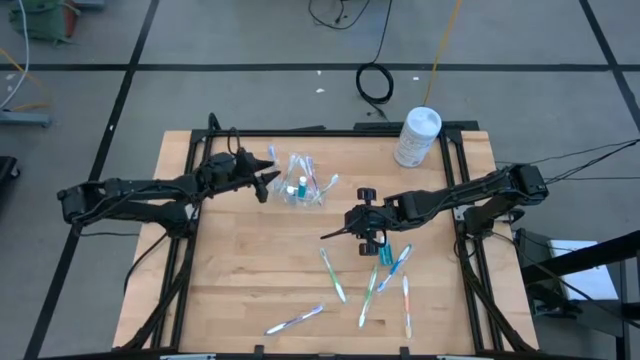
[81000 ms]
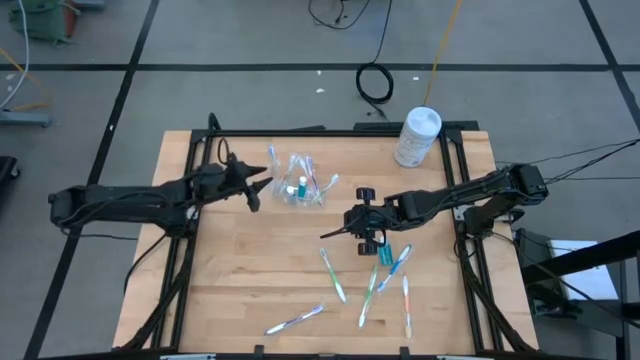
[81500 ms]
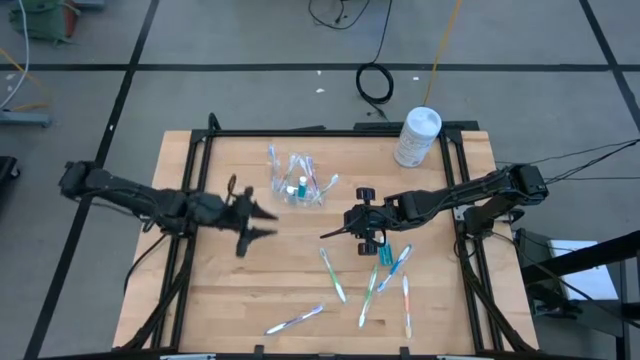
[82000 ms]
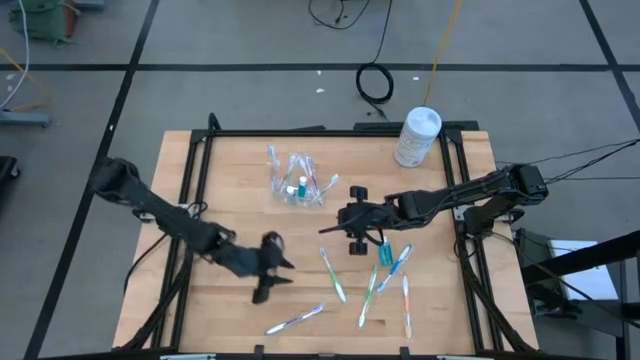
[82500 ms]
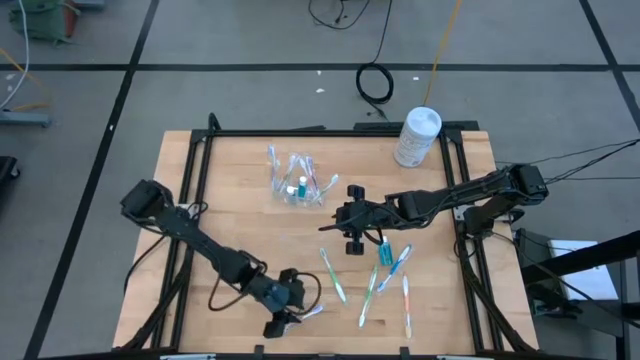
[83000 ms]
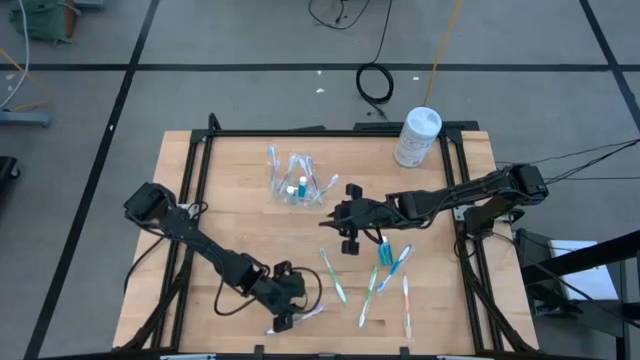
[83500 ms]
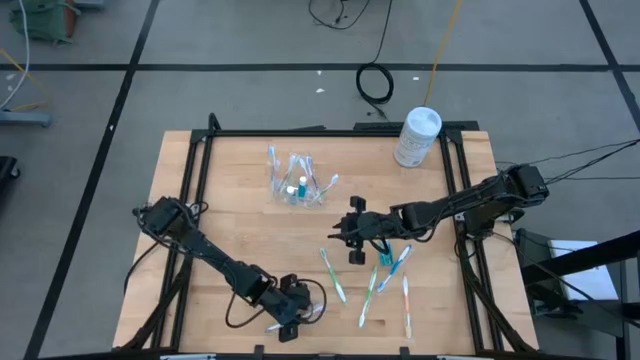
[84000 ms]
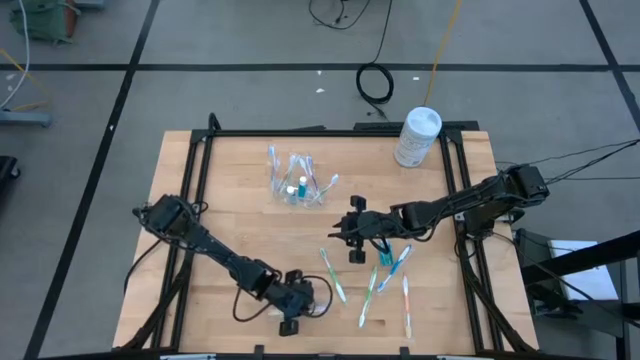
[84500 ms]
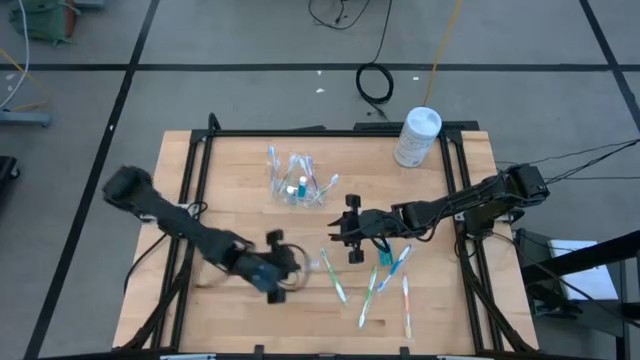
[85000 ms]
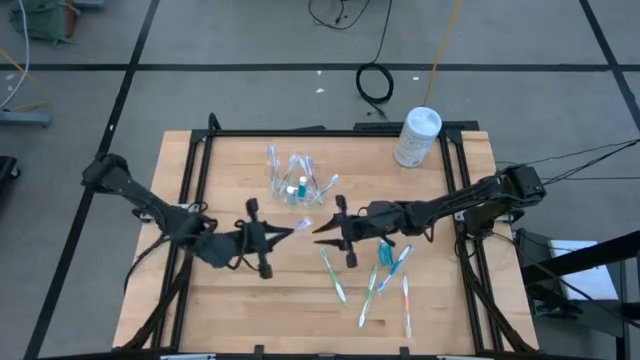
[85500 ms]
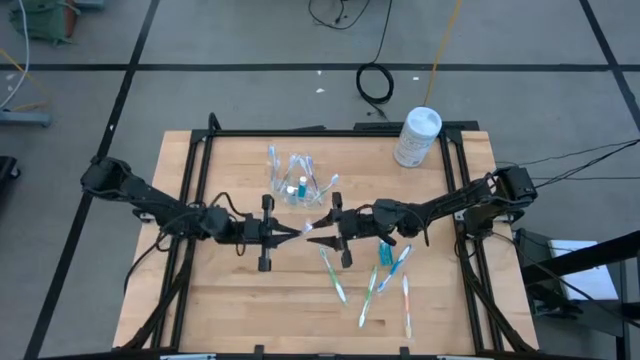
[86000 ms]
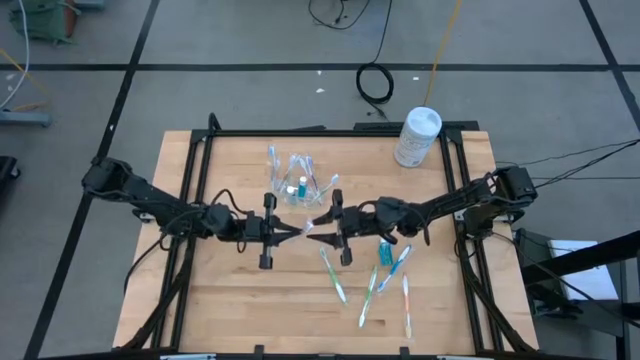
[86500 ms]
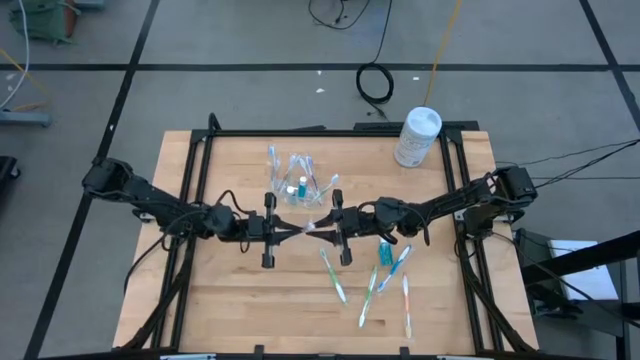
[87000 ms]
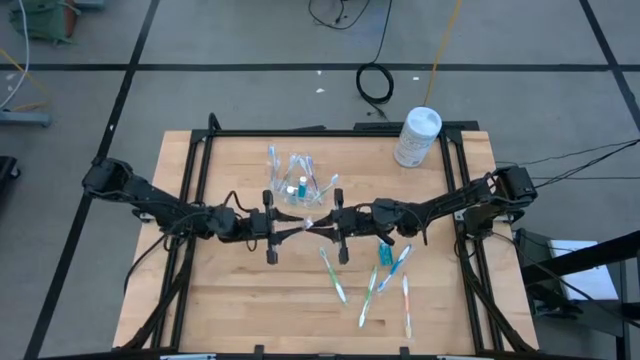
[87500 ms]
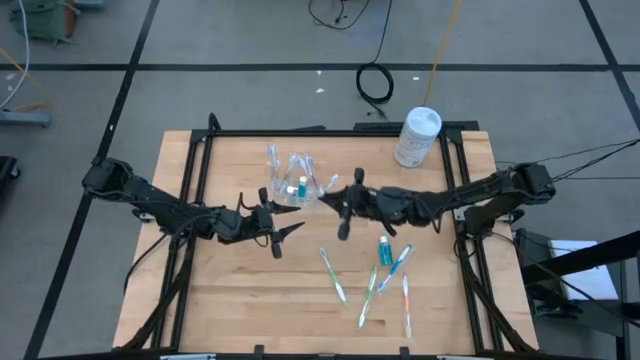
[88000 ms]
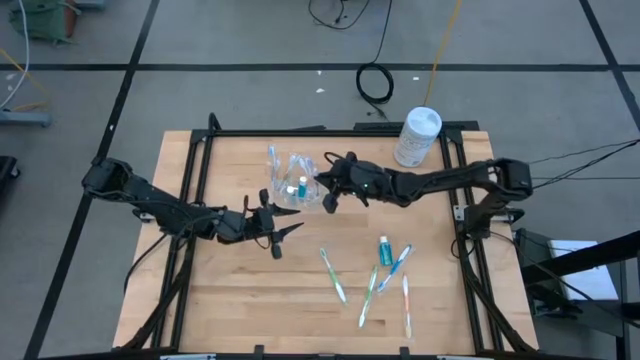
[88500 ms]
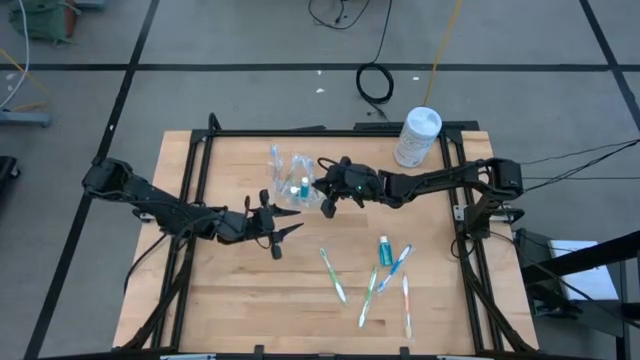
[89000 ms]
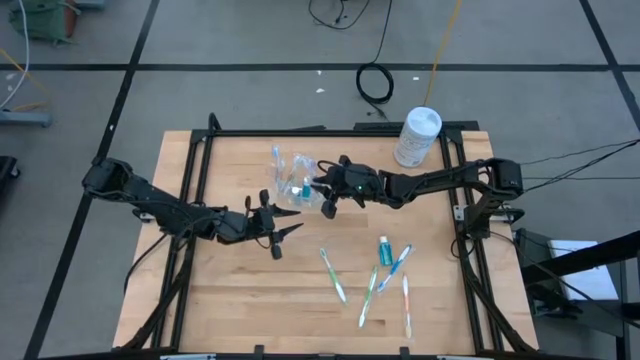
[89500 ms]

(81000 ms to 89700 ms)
Task: Pick & Place toothbrushing station
Put the purple toothbrush into the transparent organizer

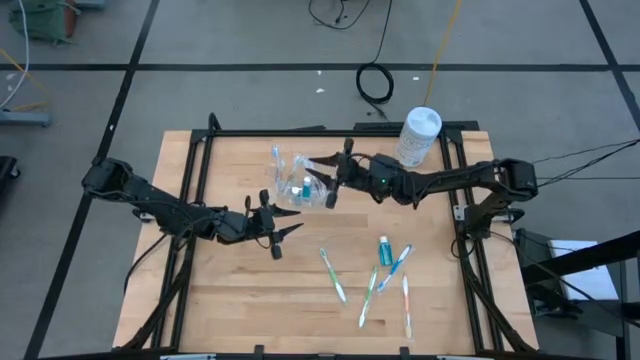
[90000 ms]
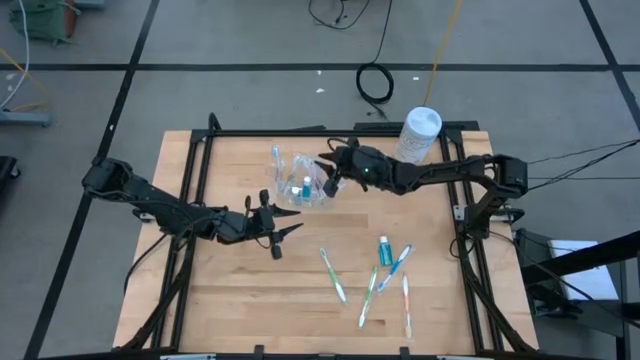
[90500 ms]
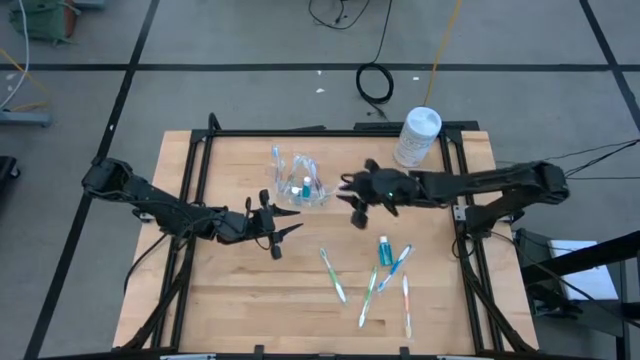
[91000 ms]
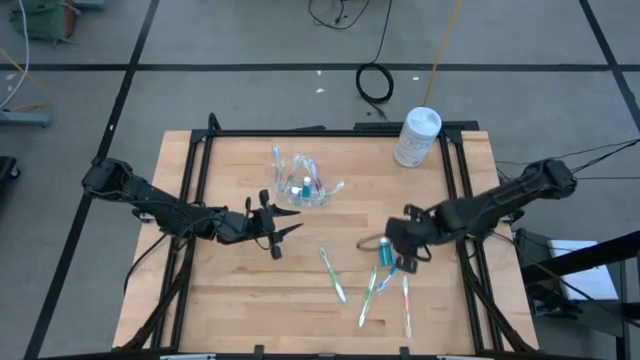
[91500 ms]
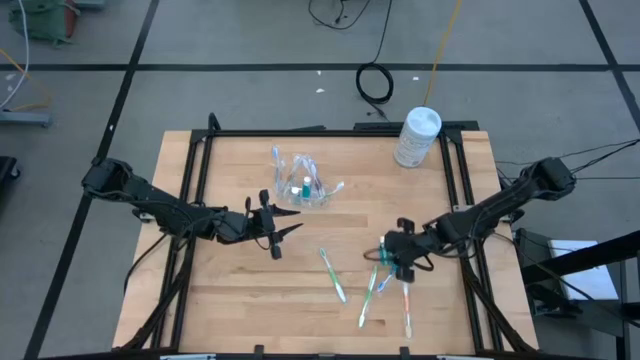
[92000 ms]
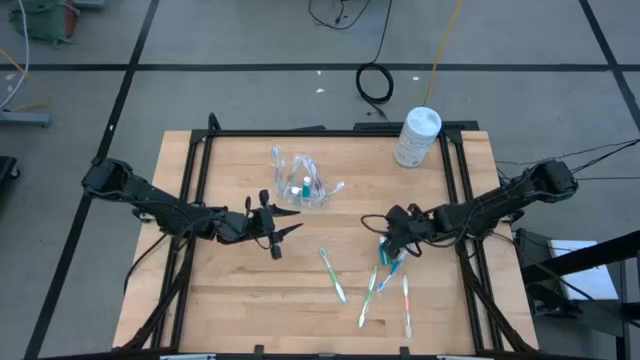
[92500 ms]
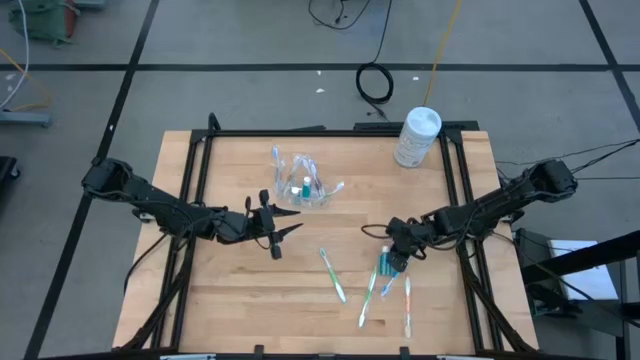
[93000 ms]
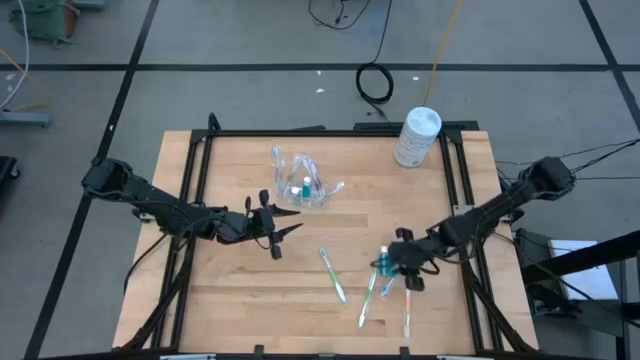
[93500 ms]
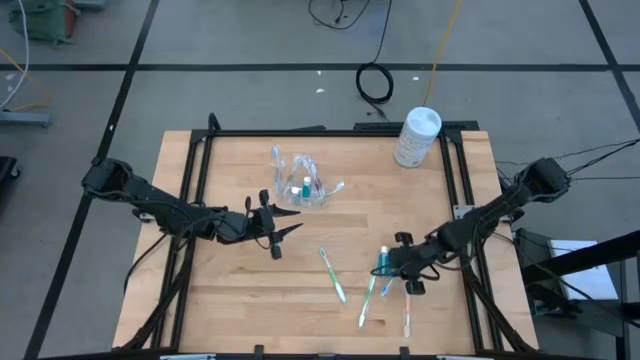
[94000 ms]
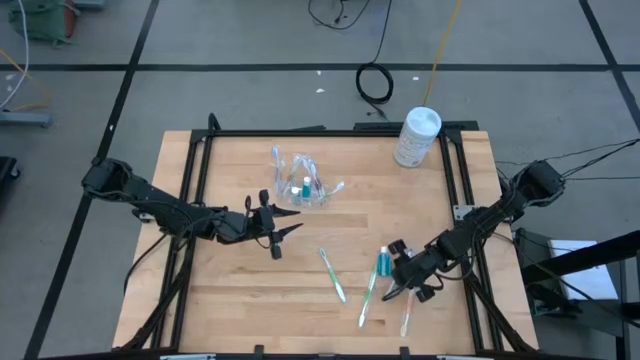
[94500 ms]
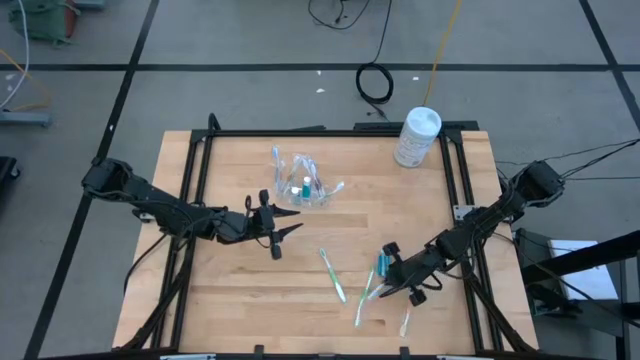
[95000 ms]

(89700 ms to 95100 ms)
Put the blue toothbrush into the transparent organizer

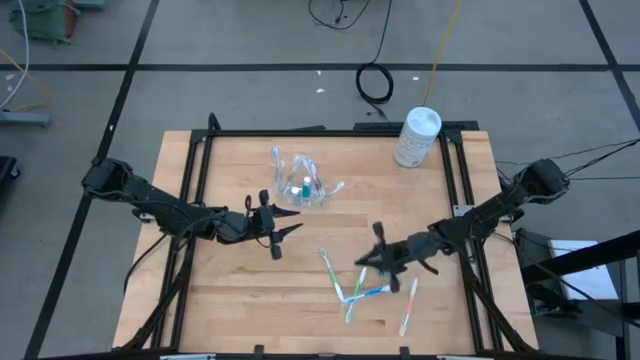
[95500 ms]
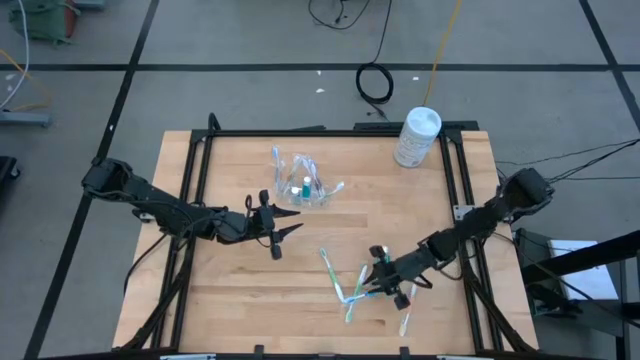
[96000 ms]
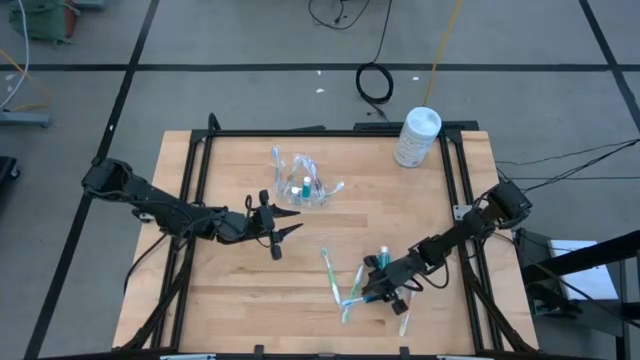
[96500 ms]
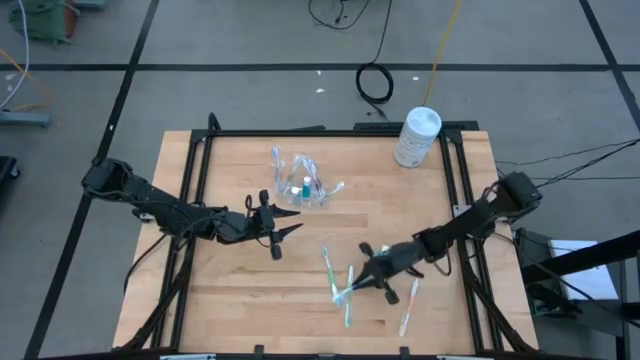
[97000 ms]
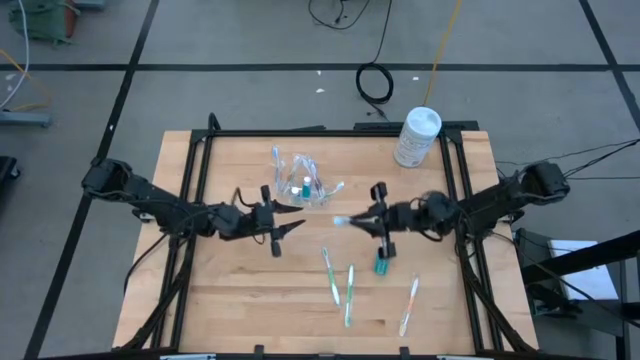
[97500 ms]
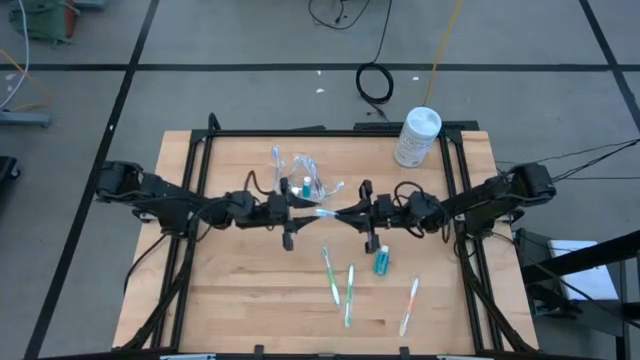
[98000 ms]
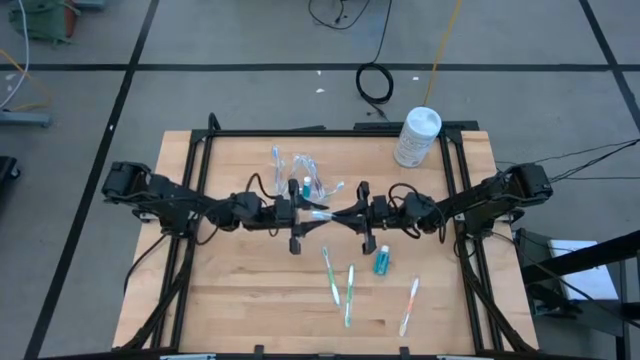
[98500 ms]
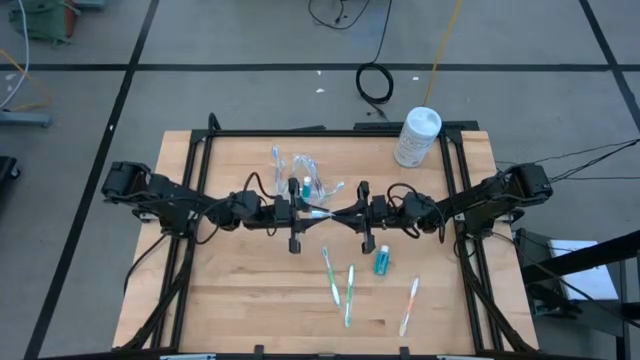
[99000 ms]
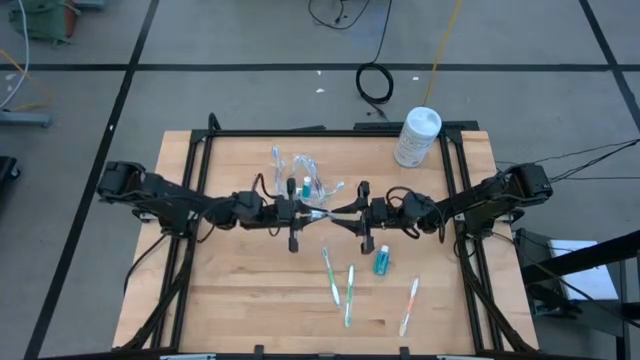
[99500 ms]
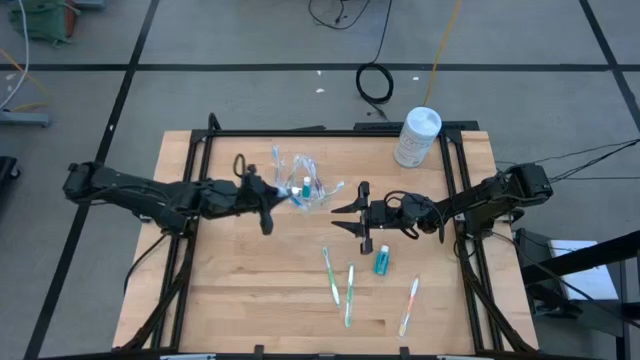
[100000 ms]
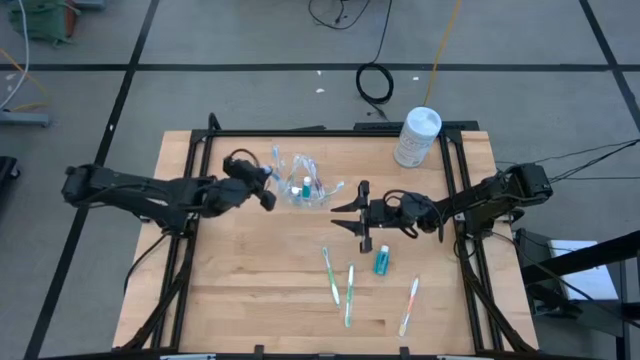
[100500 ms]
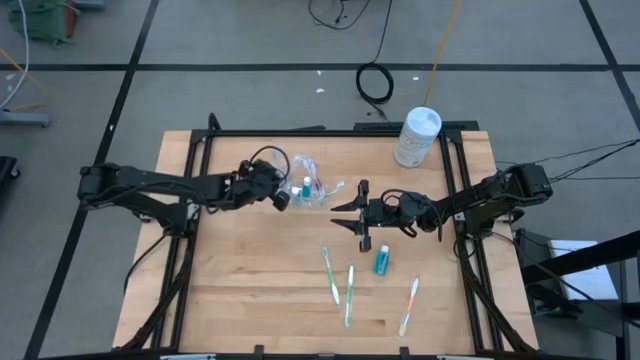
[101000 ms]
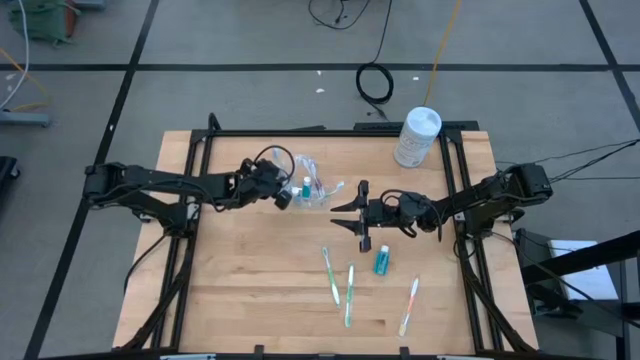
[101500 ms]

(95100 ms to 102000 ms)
Put the blue toothbrush into the transparent organizer

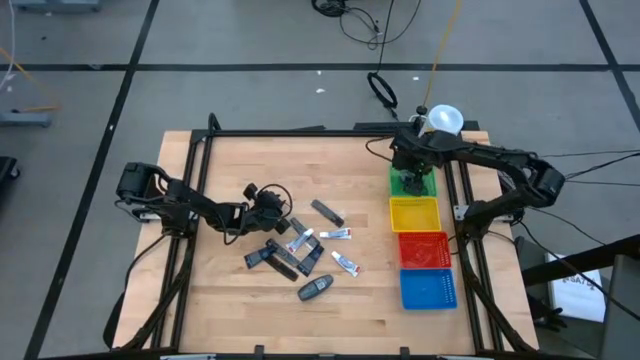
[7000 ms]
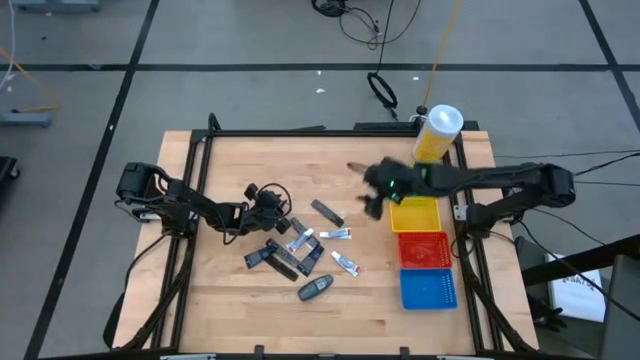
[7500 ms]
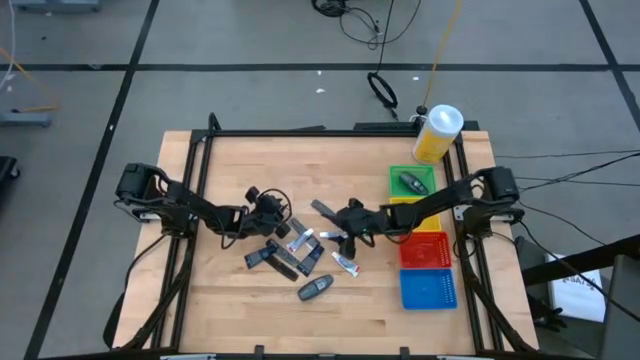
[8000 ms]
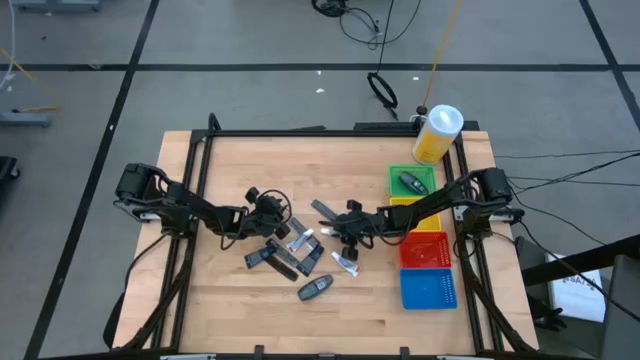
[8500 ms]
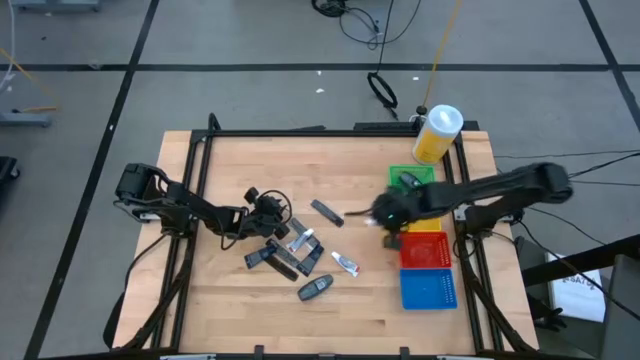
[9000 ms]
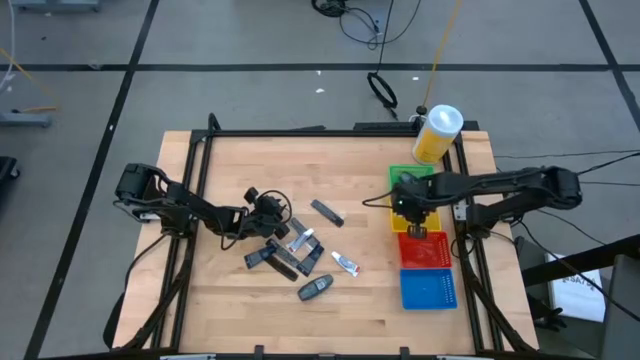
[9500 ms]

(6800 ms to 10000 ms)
Task: Pick & Place Travel size toiletries
Put the white toothpaste into the yellow basket
